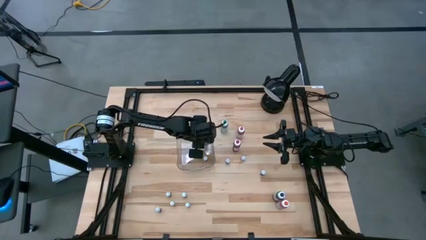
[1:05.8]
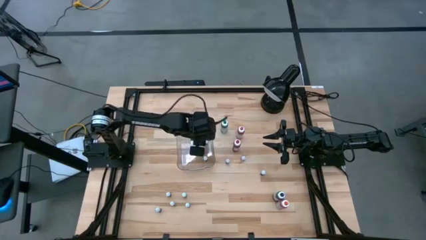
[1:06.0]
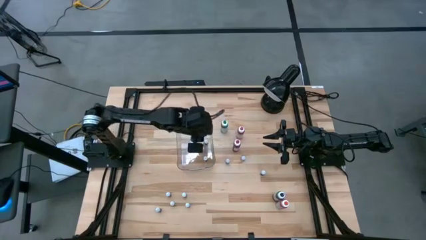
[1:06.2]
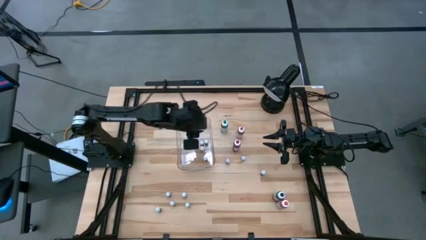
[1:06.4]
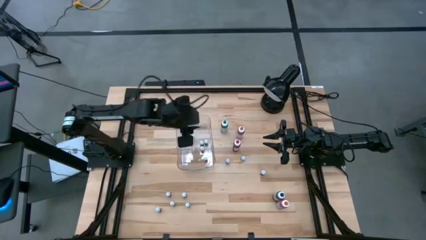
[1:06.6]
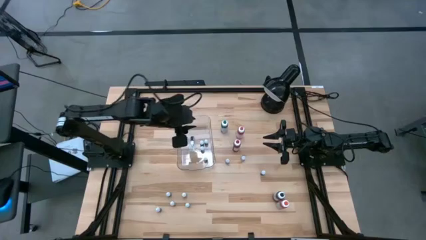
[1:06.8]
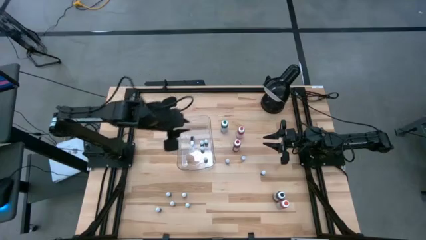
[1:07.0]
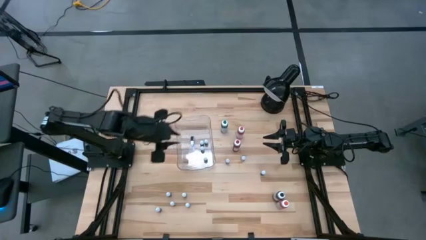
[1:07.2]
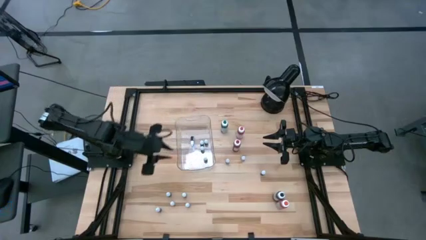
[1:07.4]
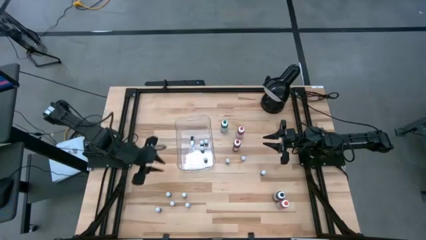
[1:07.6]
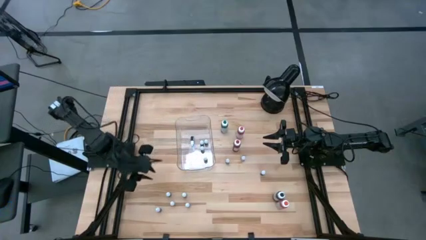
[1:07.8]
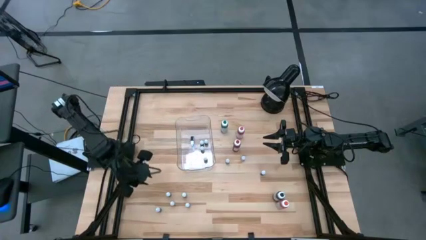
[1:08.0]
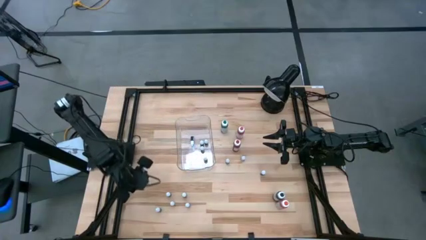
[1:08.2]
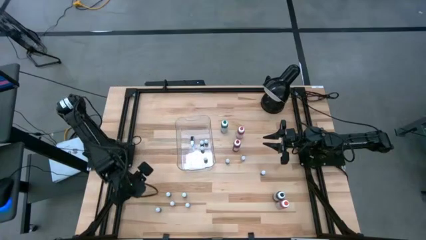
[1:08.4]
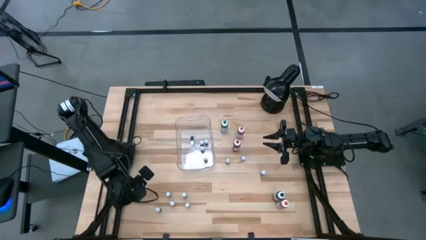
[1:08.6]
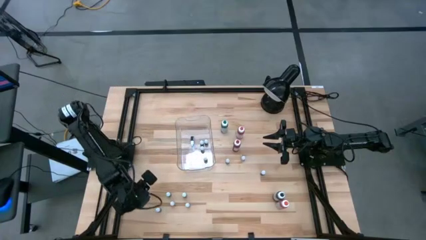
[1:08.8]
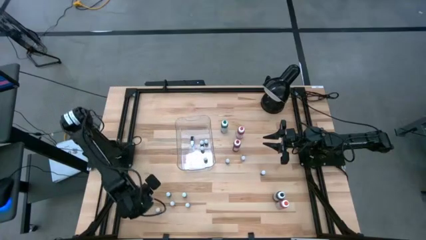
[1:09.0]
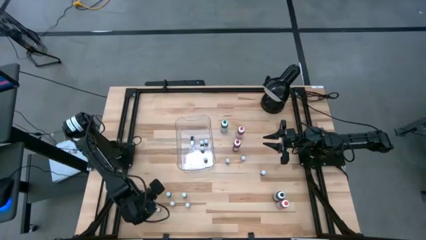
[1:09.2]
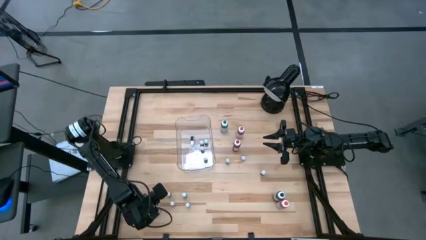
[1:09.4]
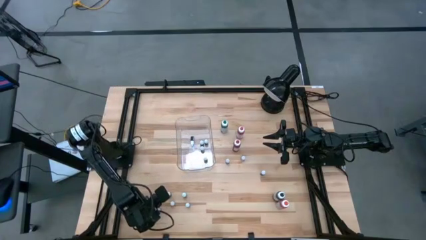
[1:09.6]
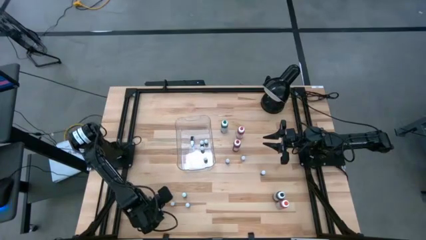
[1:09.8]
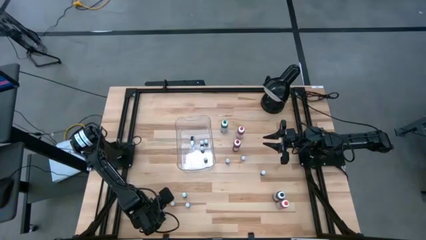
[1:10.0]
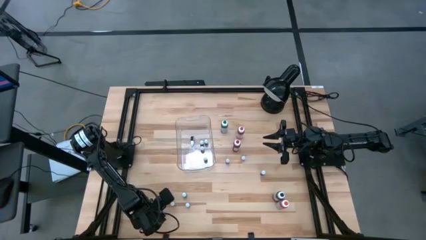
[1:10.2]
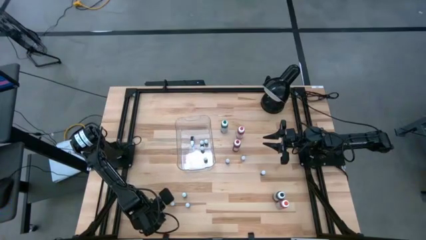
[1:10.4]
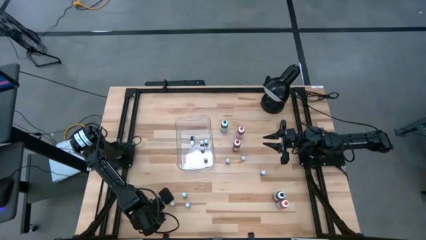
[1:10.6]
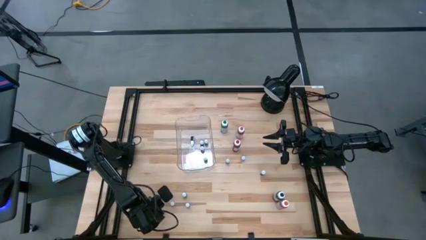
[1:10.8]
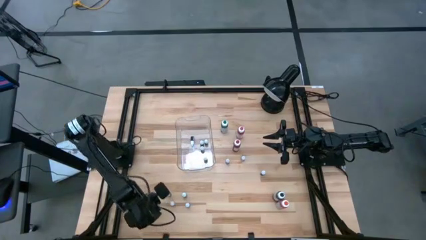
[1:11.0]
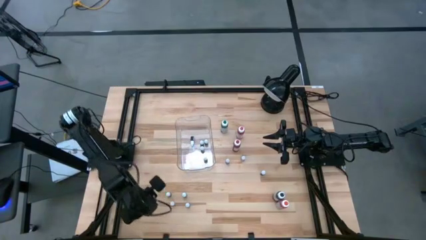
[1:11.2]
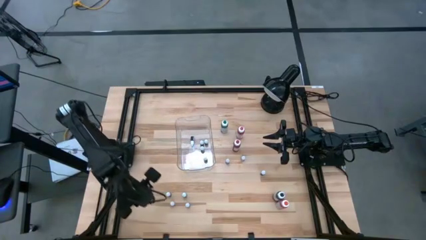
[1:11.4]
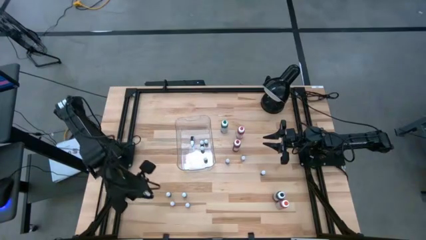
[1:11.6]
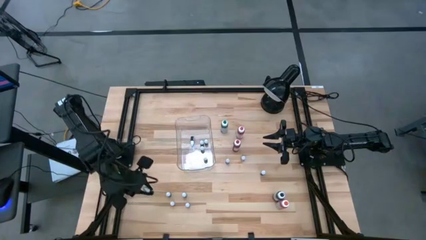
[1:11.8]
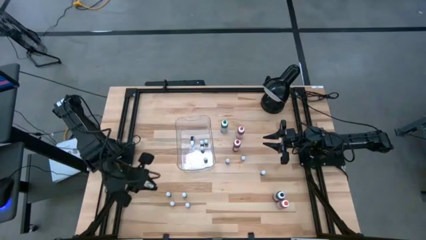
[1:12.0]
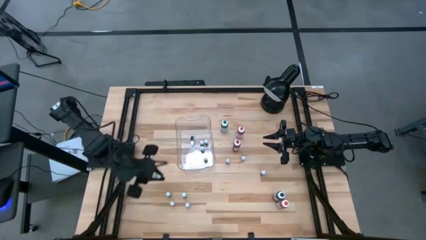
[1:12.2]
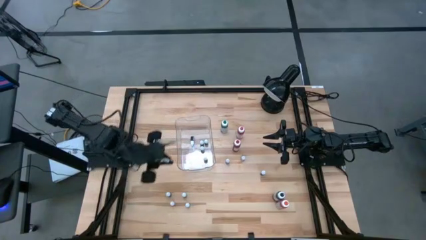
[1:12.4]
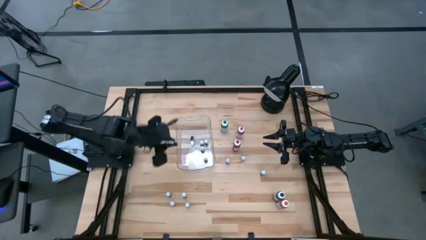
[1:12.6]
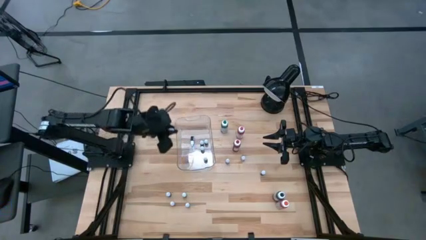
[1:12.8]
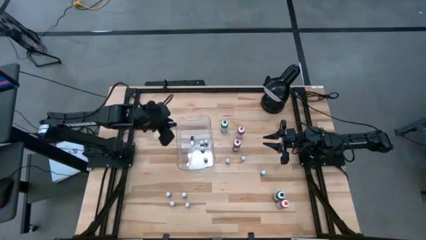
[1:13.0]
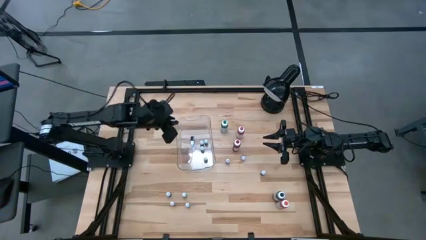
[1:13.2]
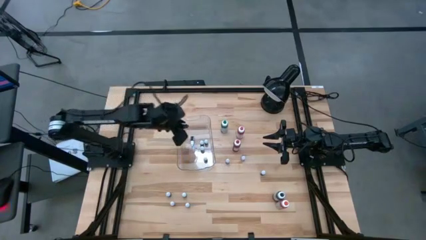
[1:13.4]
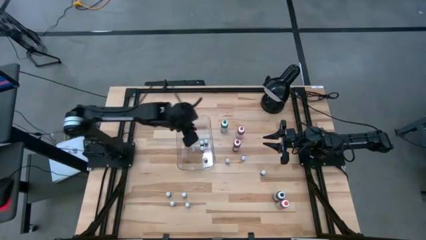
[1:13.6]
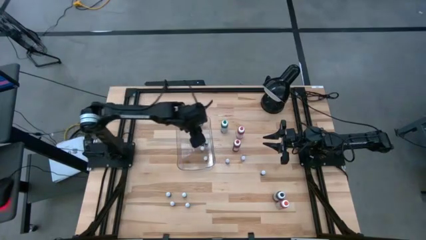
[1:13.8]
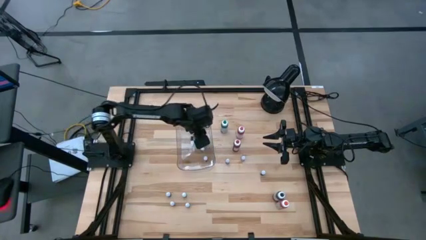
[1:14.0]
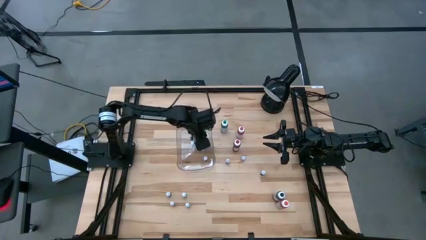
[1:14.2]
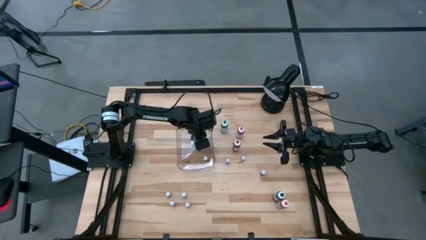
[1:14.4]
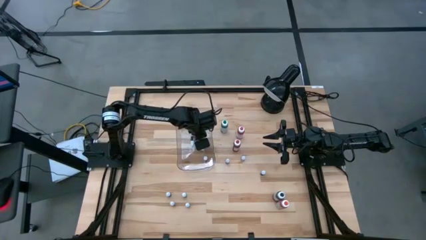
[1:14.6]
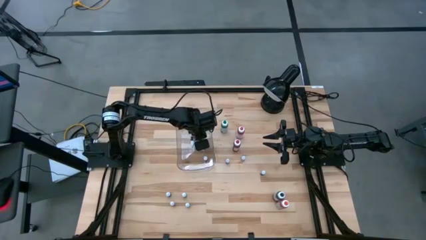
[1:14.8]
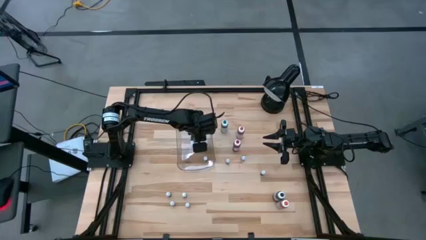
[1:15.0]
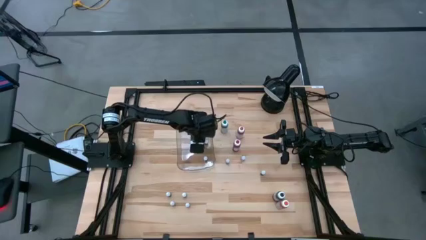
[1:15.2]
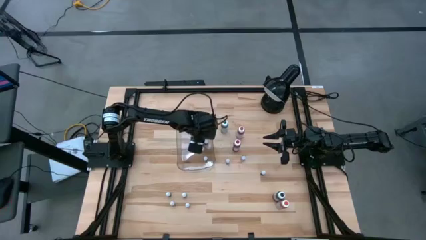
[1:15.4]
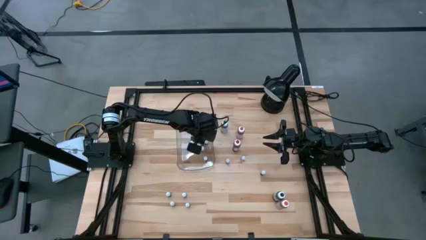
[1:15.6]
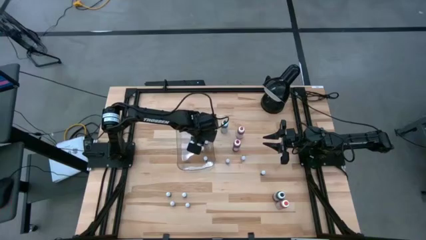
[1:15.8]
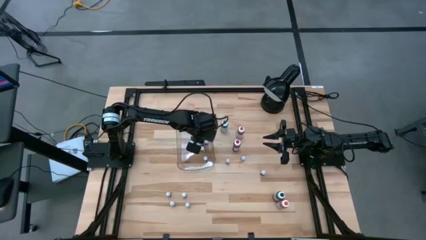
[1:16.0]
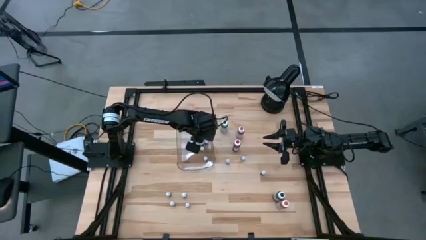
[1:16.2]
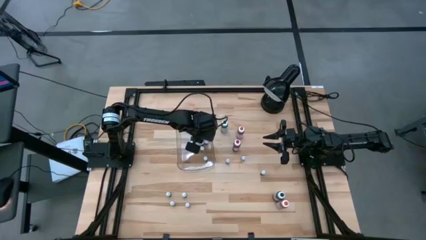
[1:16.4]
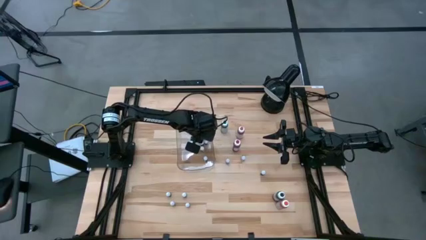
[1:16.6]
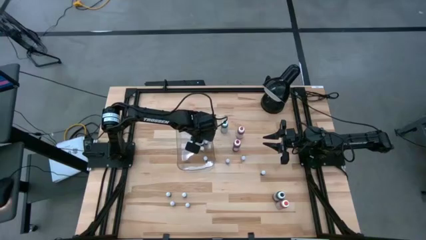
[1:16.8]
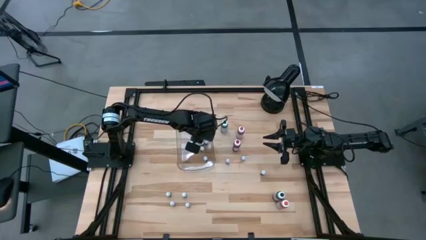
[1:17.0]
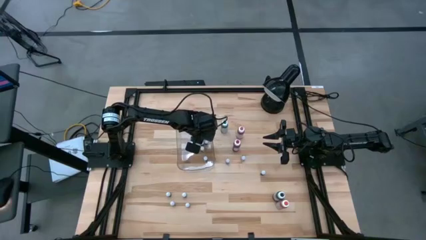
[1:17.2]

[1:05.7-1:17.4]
Task: Pick & Place food coloring
Put the small black food coloring bottle into the transparent bin

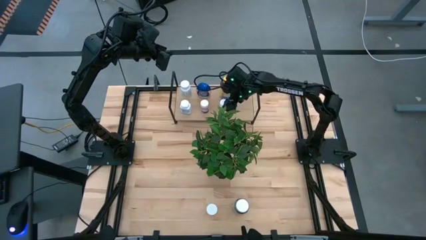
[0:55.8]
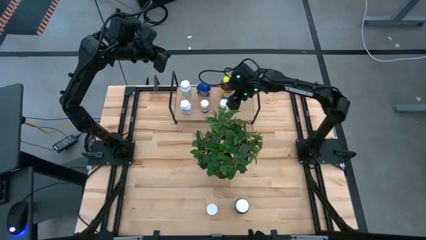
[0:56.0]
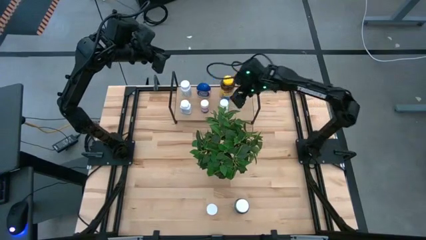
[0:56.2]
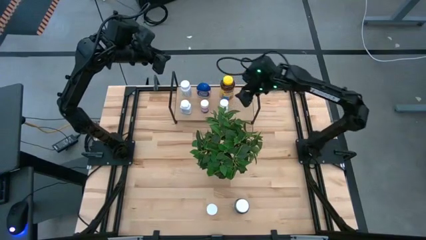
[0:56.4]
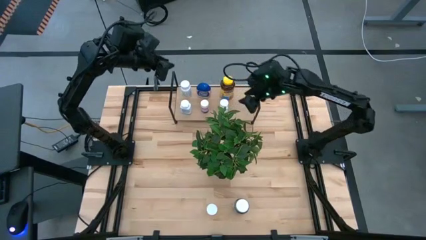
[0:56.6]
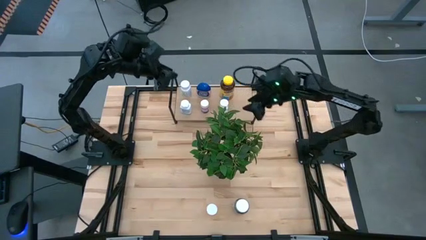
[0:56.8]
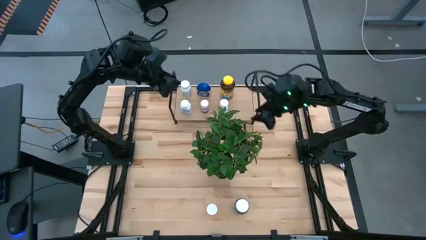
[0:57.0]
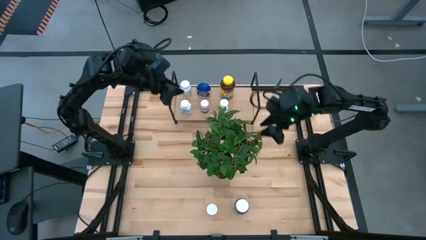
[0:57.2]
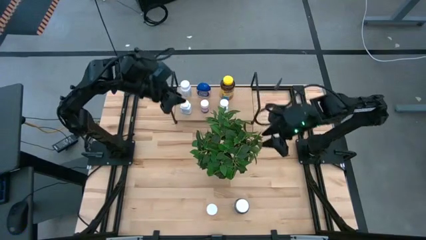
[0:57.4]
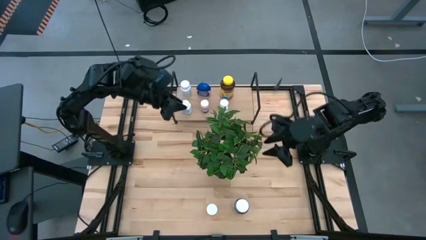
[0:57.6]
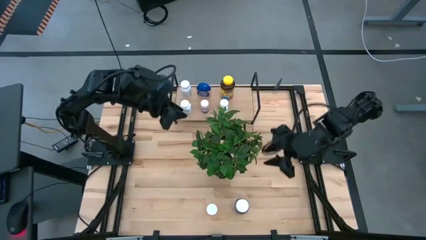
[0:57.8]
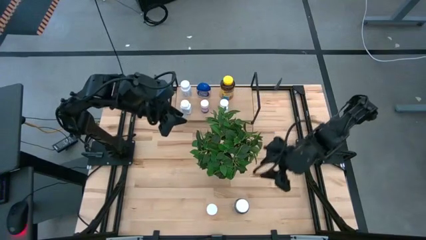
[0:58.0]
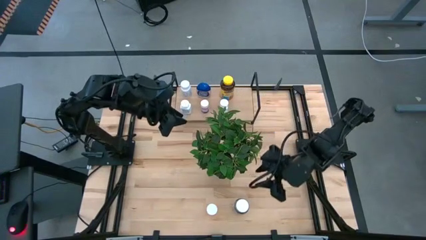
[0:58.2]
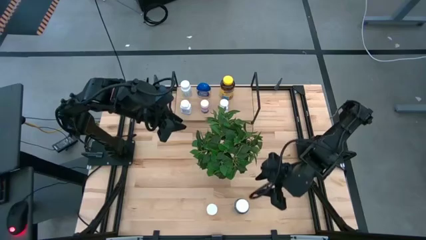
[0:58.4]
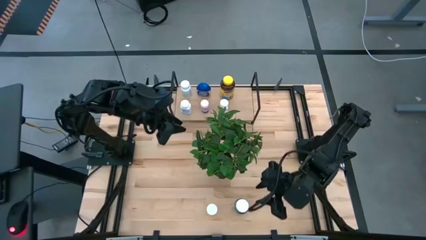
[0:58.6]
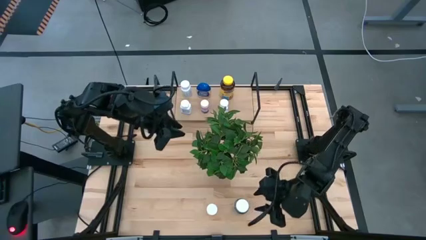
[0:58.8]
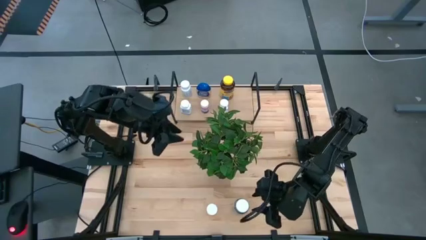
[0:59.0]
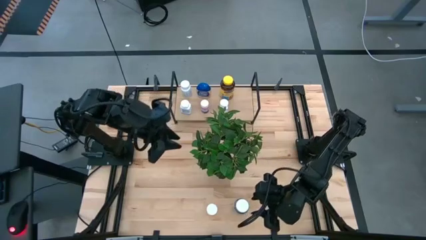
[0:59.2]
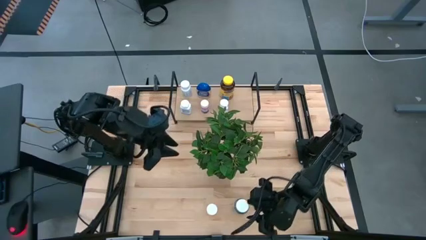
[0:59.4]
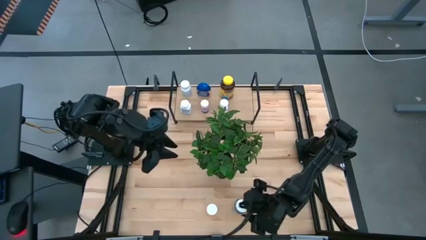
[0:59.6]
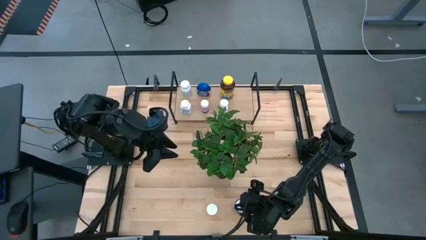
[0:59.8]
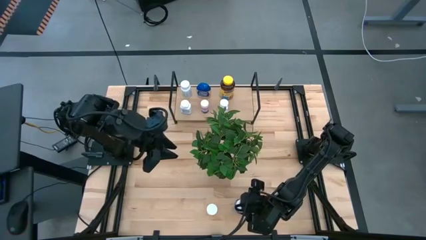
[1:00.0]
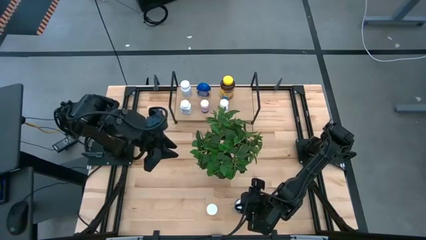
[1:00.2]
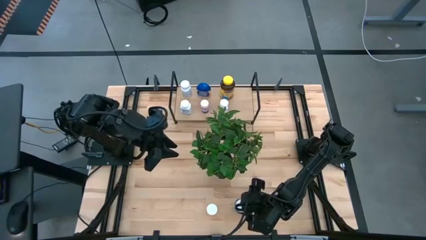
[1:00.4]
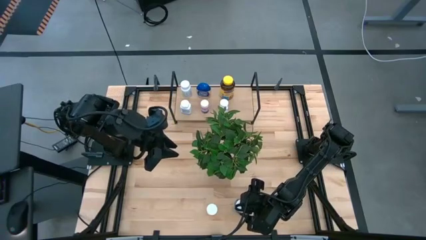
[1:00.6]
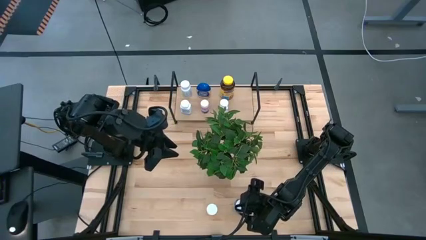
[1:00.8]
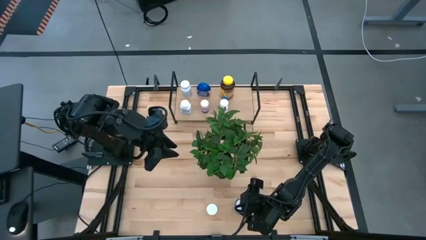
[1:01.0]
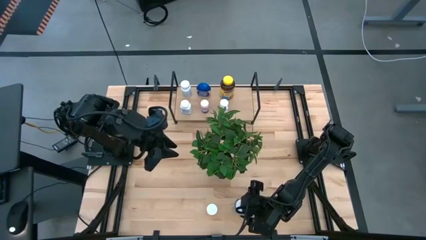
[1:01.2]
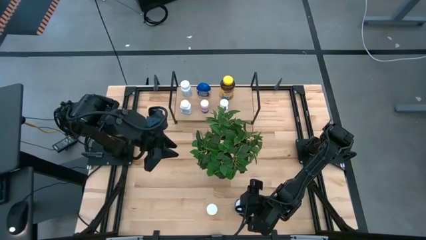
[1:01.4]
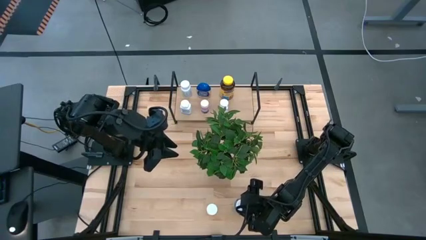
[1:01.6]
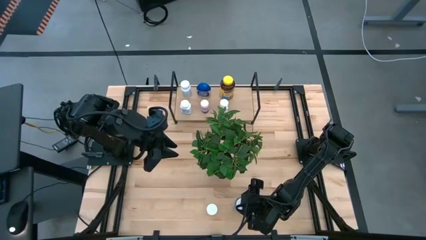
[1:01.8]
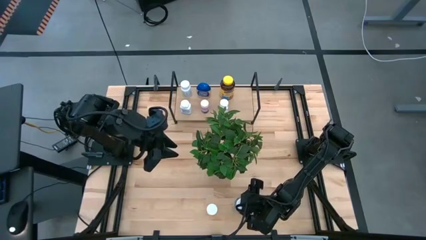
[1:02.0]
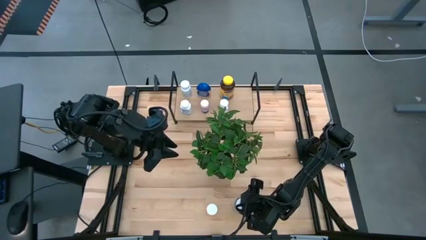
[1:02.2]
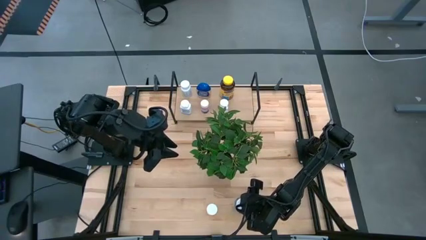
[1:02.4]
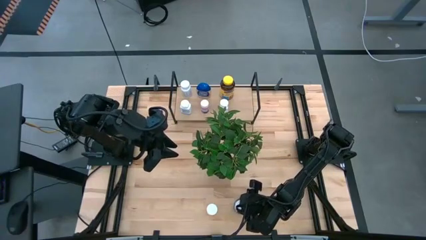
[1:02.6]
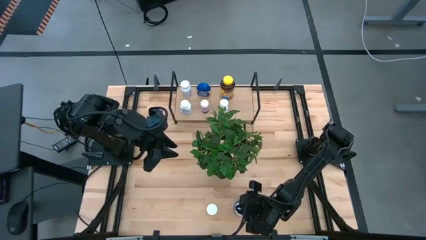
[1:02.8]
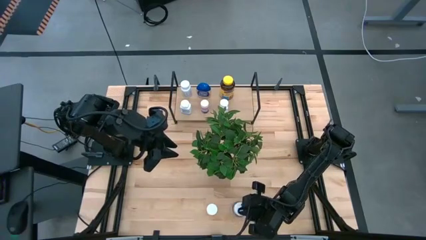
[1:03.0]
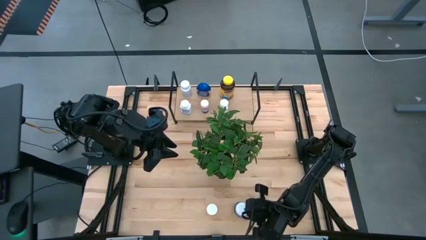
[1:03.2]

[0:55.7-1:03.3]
Task: Pick and place medicine bottles onto shelf by color
Put the green pill bottle on the shelf
